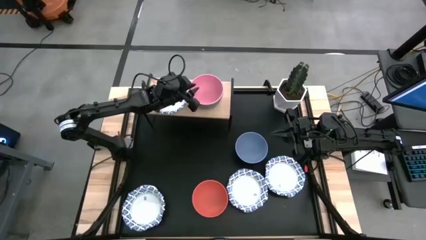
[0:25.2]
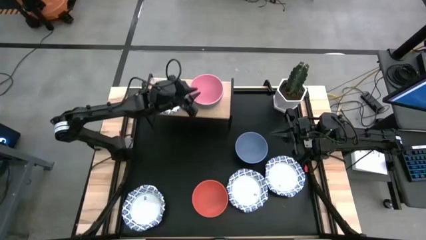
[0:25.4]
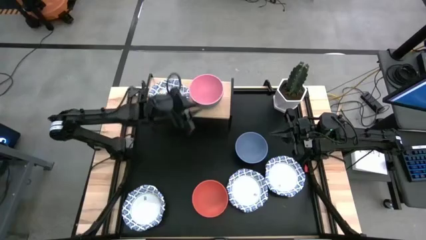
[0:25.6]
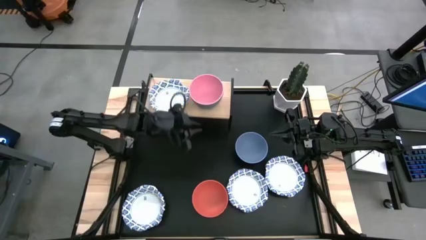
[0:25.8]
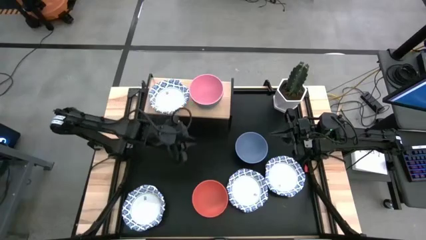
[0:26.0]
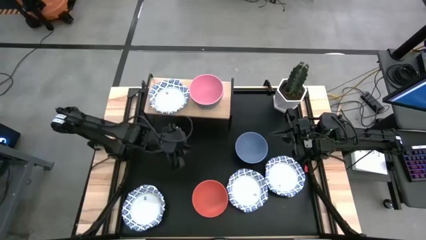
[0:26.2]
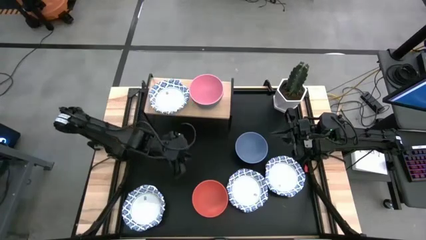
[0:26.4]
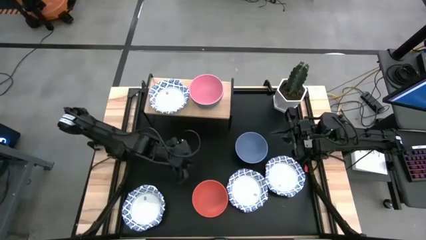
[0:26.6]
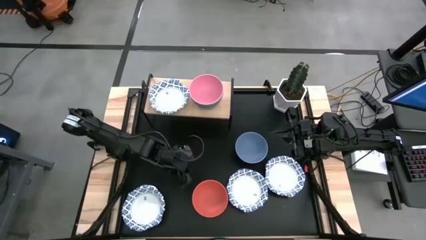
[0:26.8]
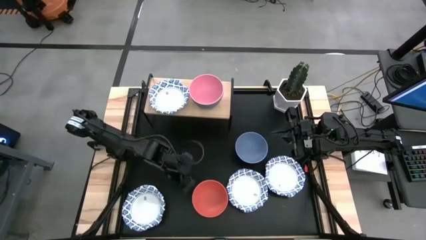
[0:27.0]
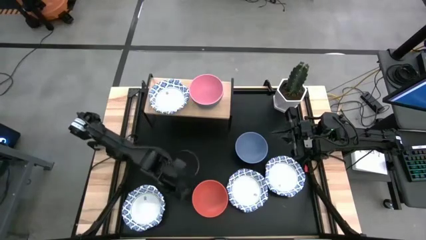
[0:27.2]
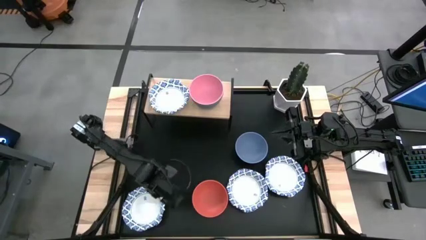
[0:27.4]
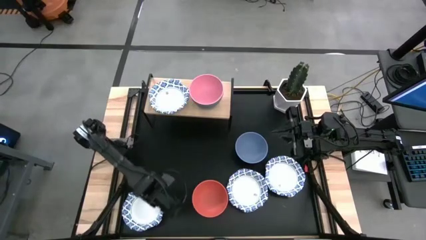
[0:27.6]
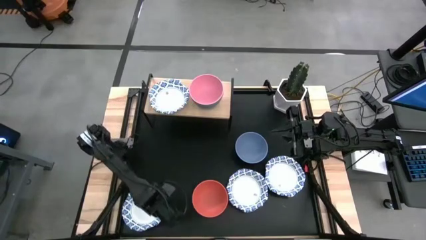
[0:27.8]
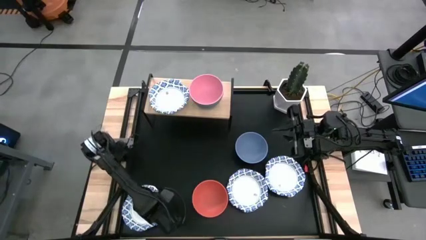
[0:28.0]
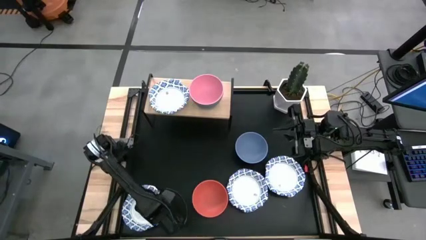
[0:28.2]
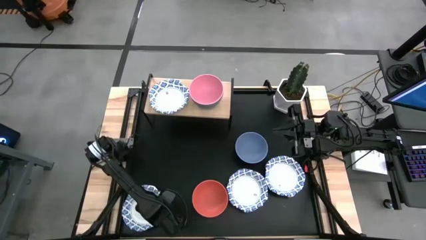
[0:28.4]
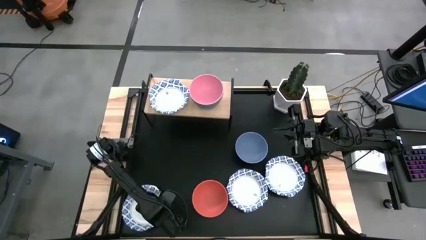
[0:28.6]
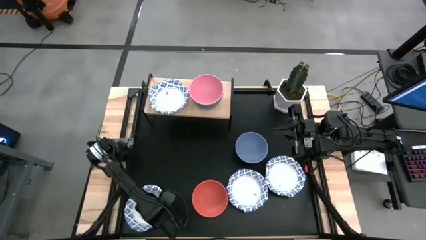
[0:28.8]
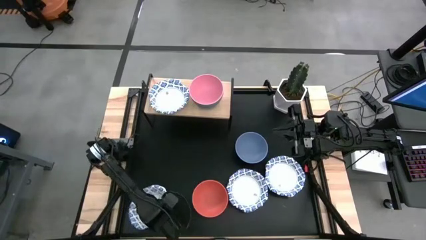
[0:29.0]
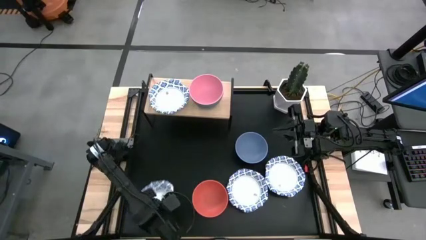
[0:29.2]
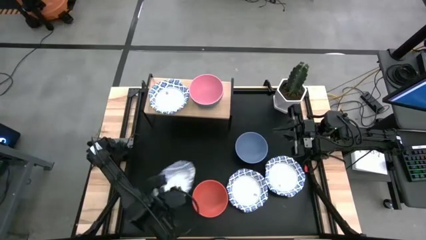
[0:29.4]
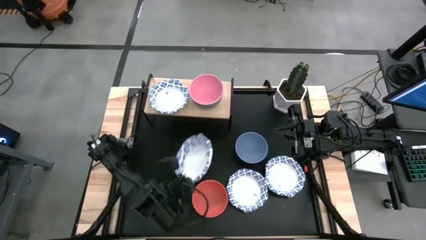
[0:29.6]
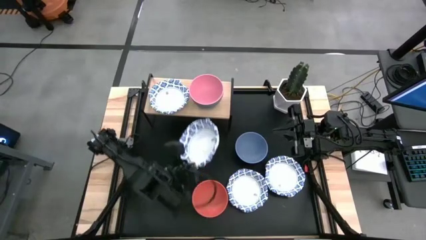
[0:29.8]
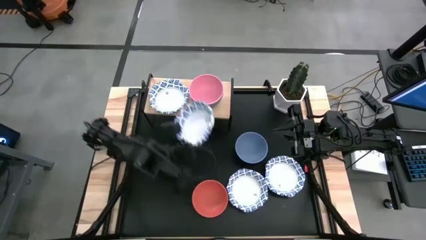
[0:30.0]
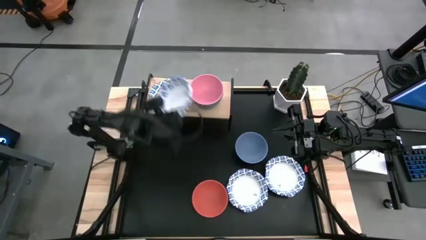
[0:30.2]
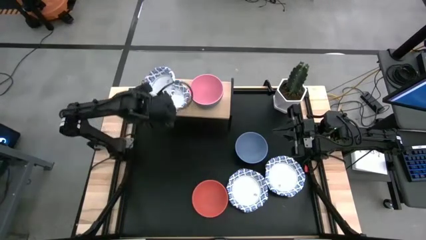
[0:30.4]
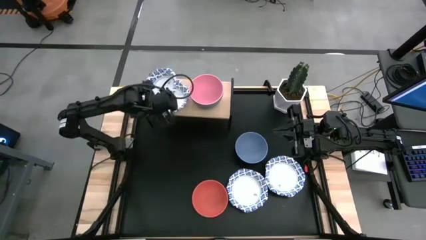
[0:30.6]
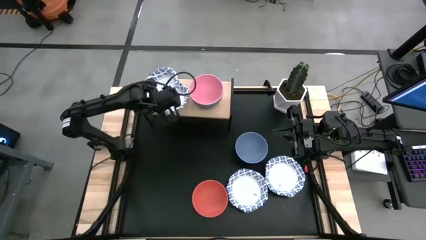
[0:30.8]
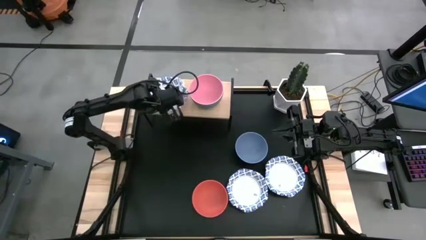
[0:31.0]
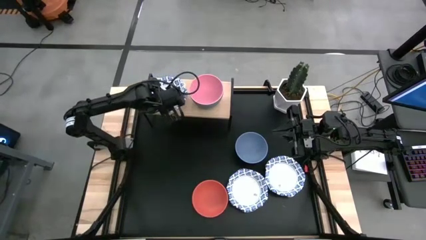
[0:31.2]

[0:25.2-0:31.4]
Task: Place and stack bowls onto a shelf
Stack the white patterned bowl on top of the white patterned bowl on the shelf

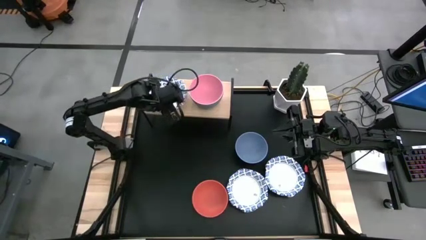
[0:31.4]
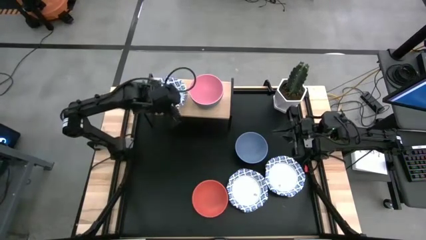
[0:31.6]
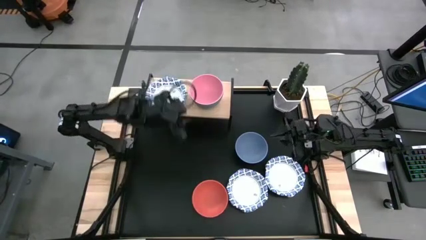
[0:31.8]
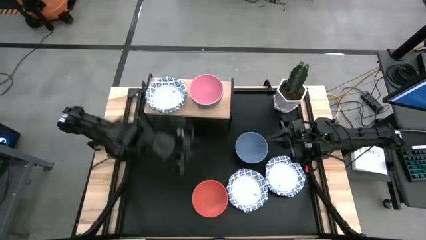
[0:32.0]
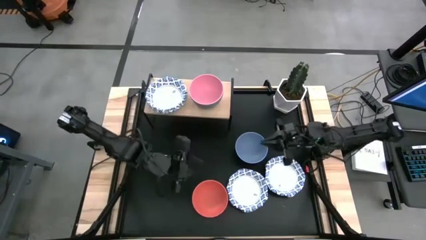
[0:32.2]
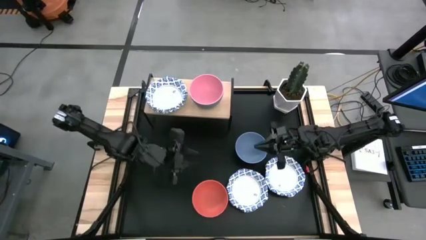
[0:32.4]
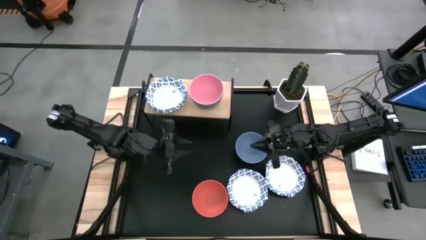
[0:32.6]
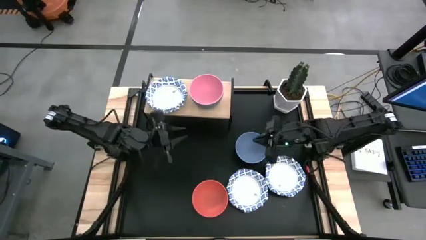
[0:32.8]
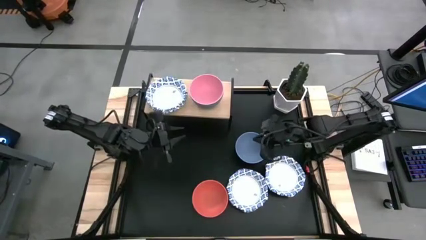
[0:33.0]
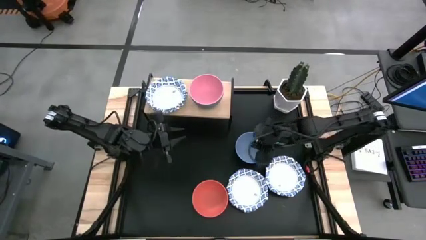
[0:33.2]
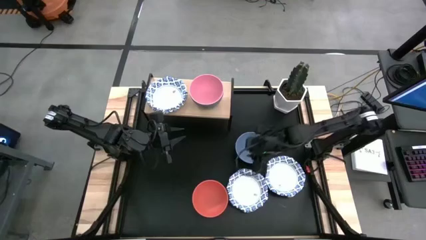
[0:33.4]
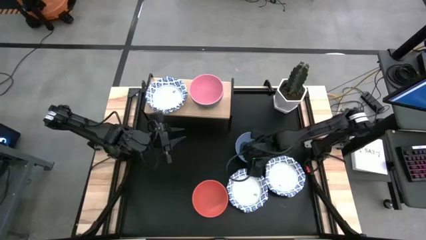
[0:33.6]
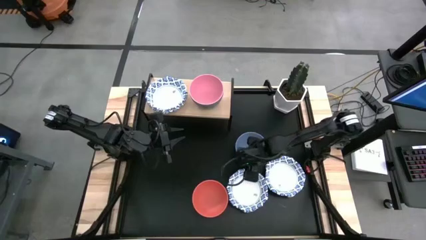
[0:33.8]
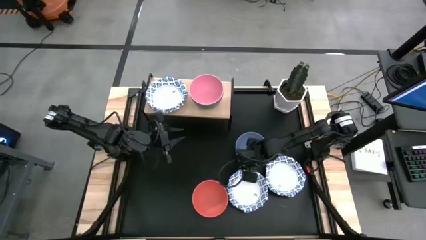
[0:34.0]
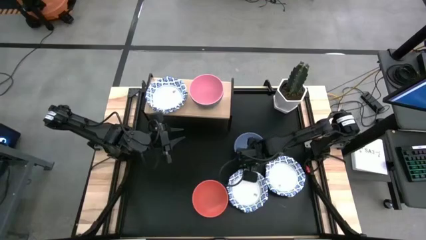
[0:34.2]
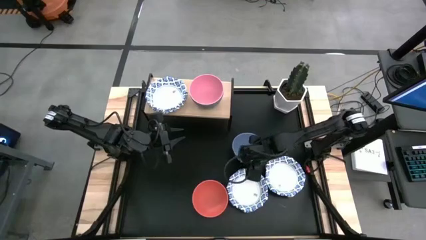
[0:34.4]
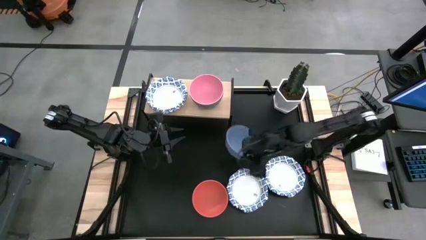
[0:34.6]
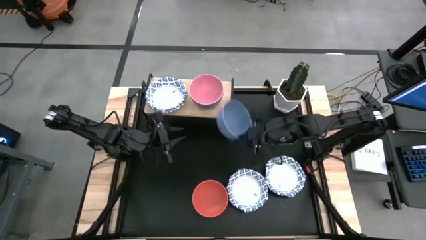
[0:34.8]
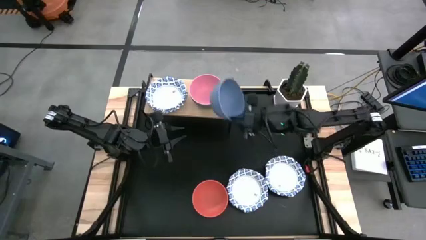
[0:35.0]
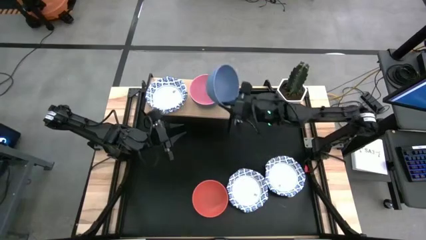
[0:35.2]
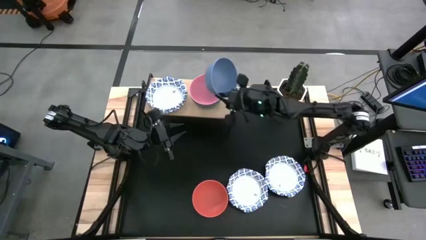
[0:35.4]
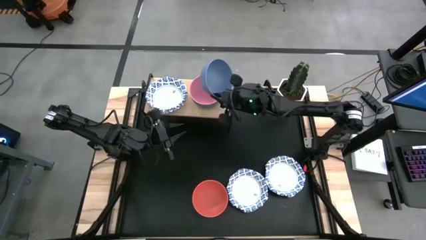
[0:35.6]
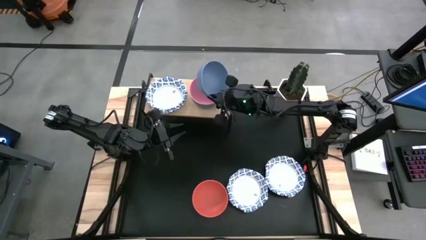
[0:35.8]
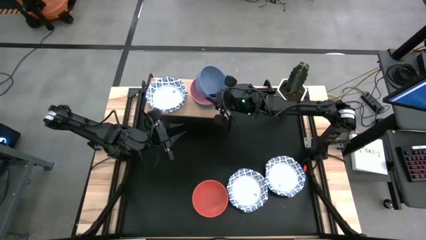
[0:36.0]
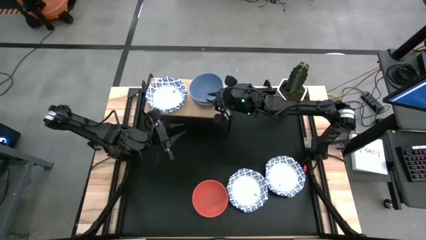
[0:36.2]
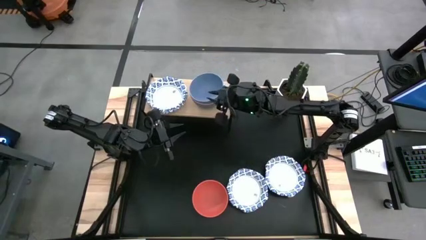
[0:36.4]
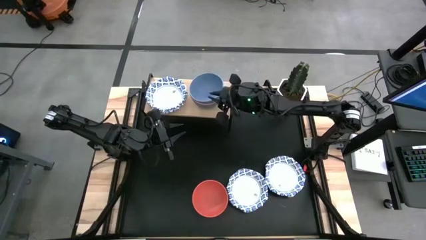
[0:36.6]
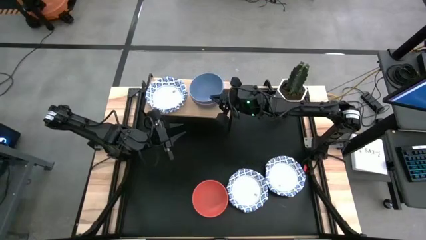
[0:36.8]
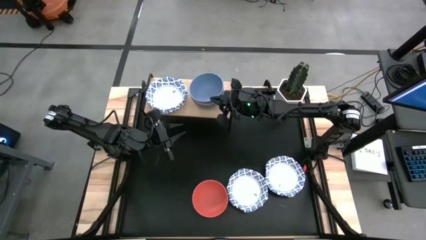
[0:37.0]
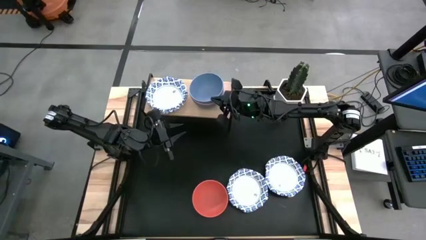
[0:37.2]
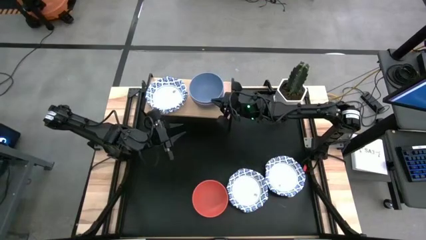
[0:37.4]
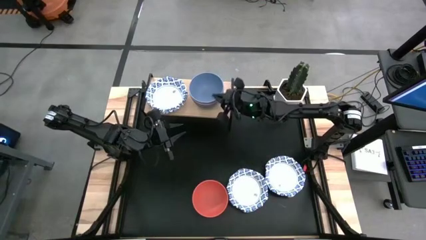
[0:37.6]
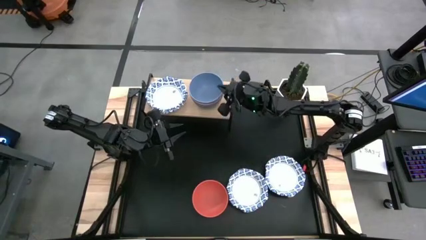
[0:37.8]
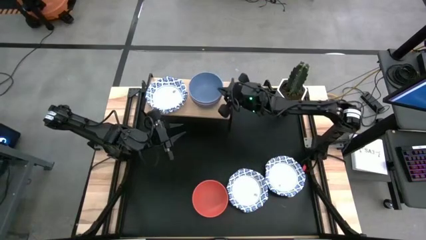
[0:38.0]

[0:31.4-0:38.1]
Stack the blue bowl on top of the pink bowl on the shelf

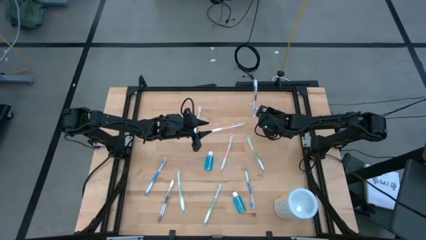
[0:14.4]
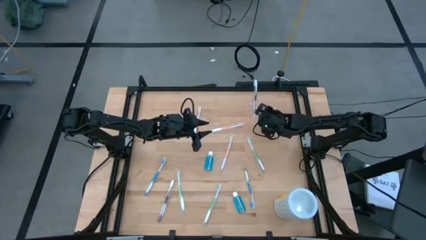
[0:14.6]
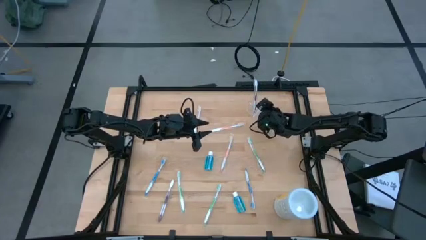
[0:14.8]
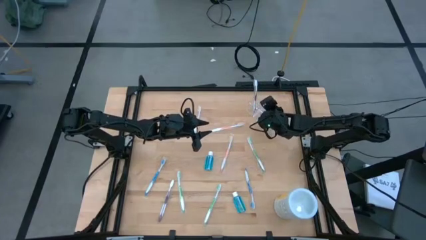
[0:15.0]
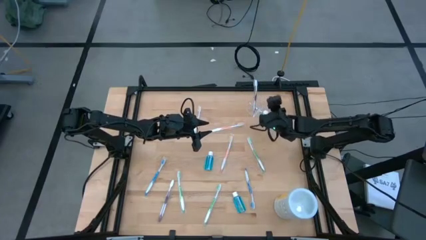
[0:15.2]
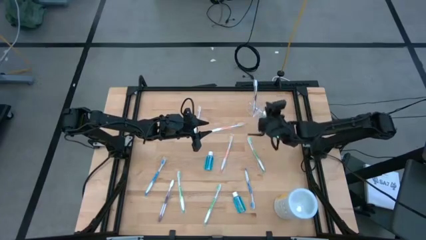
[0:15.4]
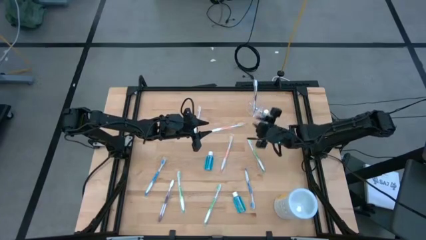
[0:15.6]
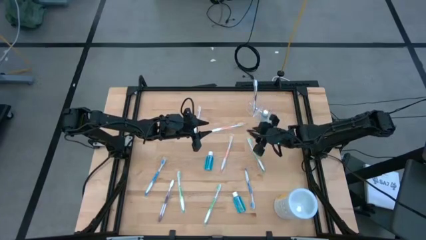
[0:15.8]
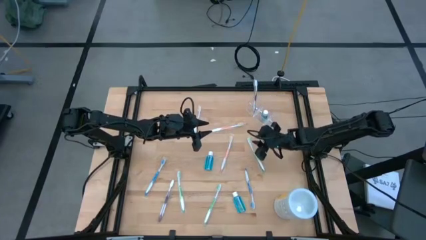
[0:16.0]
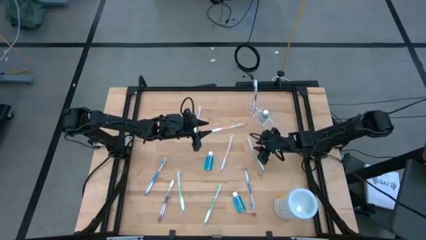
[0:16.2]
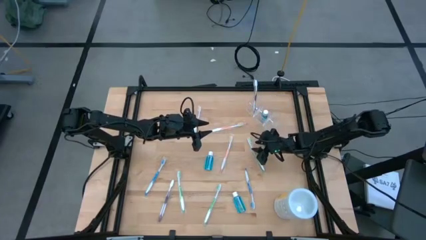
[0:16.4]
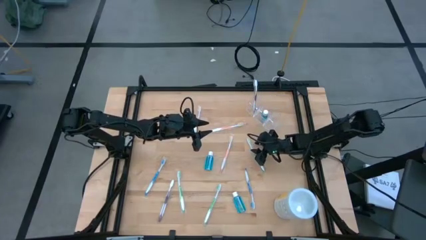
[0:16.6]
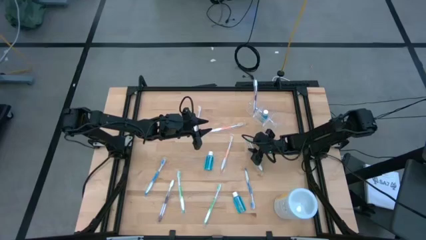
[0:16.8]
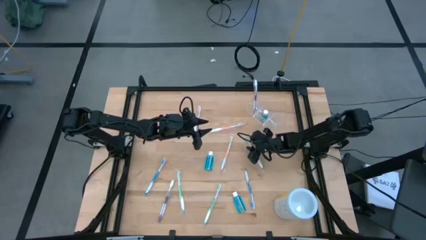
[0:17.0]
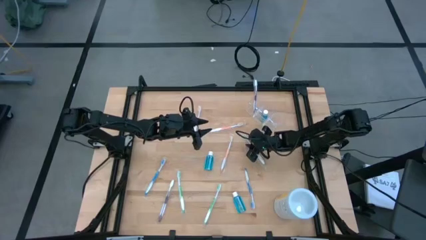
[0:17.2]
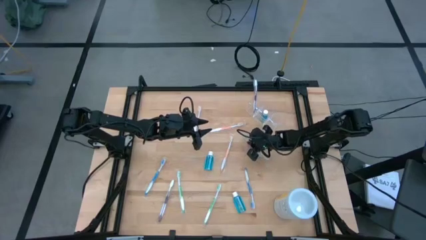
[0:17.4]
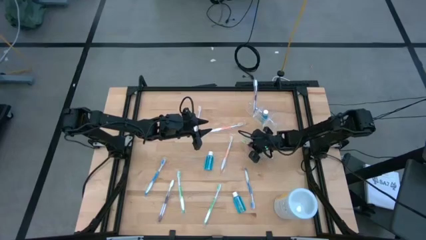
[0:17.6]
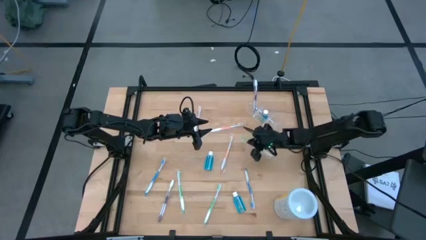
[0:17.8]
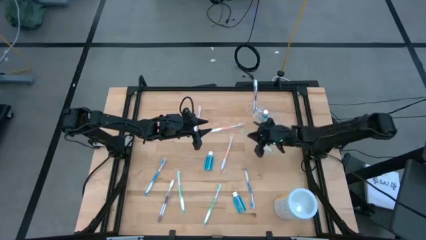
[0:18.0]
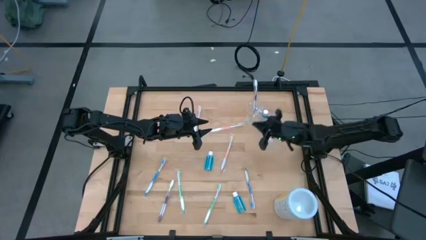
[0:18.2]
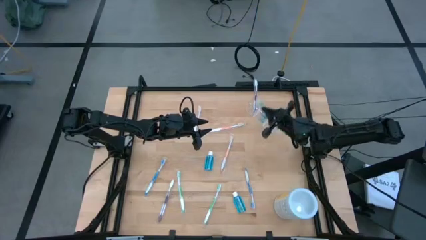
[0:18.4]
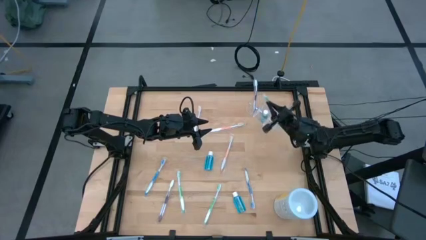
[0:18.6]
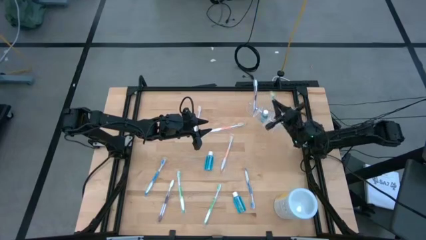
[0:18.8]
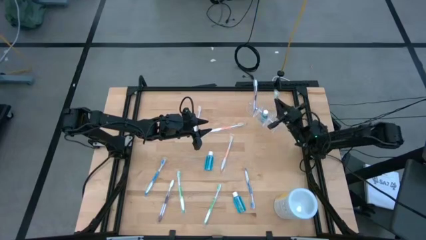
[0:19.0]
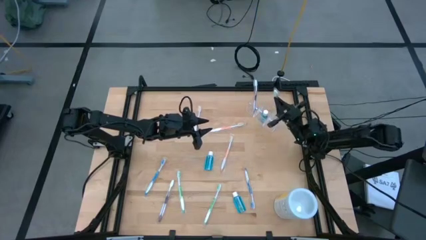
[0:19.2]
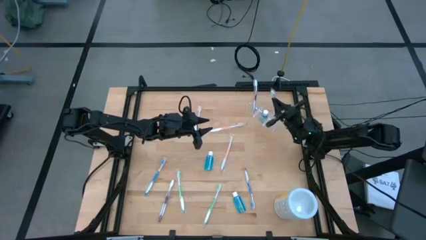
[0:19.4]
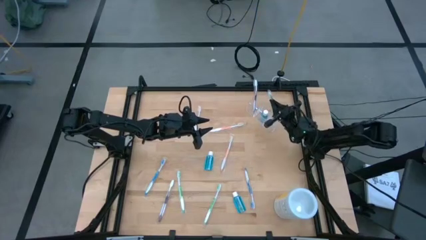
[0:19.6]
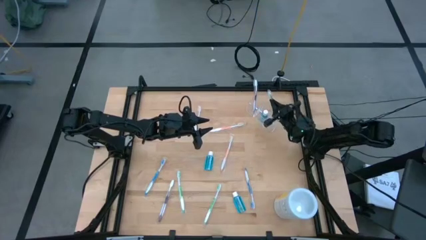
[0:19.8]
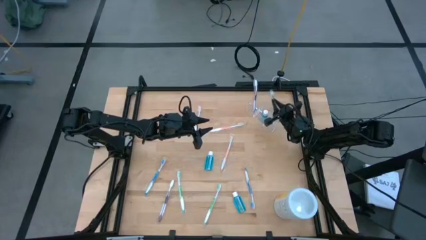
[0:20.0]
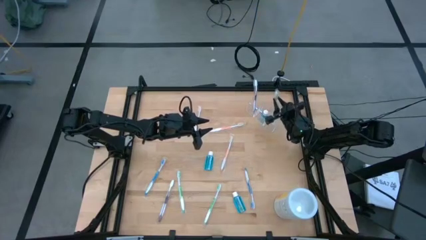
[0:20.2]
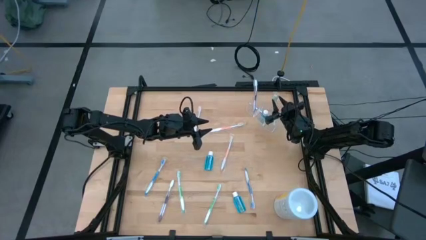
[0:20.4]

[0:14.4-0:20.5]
Task: Pick & Place toothbrushing station
Put the top green toothbrush into the transparent organizer
